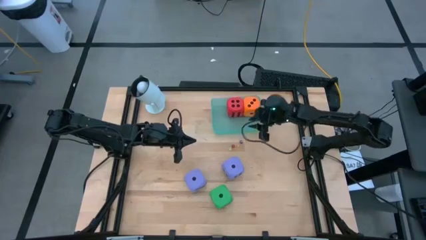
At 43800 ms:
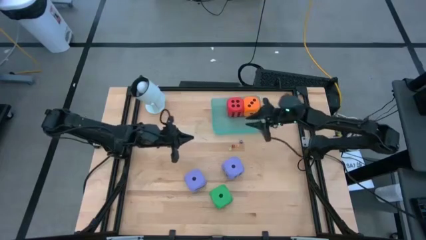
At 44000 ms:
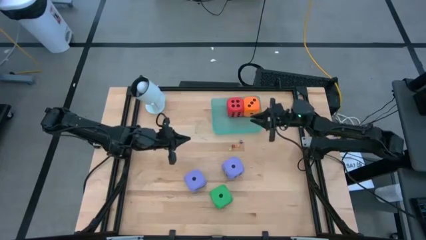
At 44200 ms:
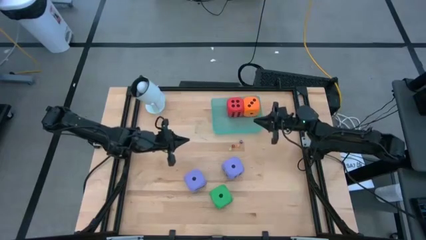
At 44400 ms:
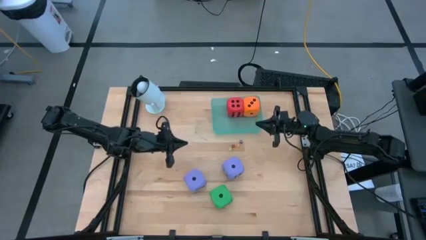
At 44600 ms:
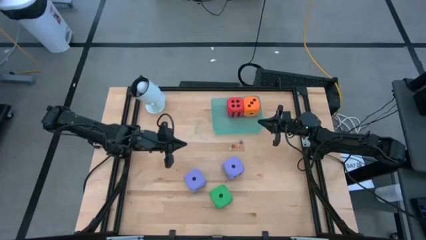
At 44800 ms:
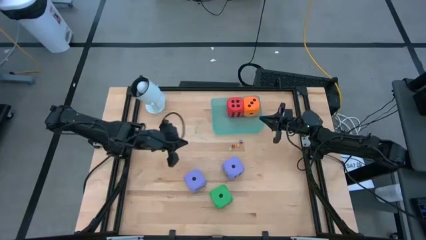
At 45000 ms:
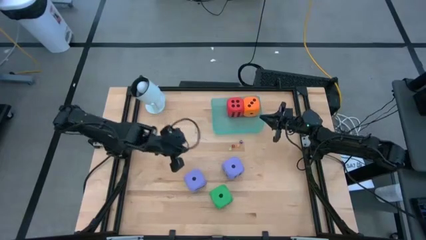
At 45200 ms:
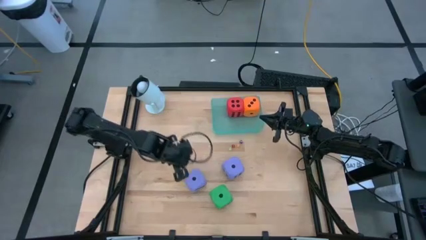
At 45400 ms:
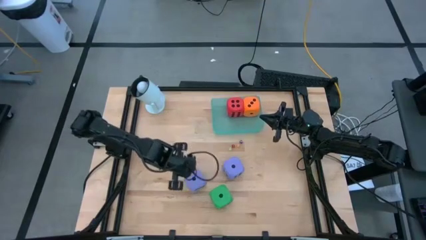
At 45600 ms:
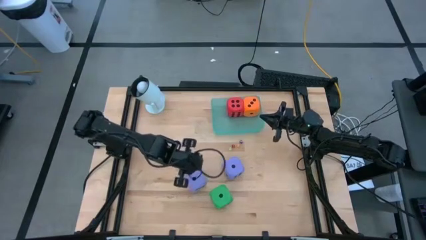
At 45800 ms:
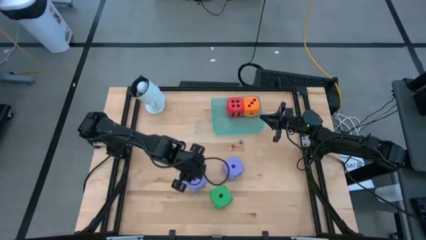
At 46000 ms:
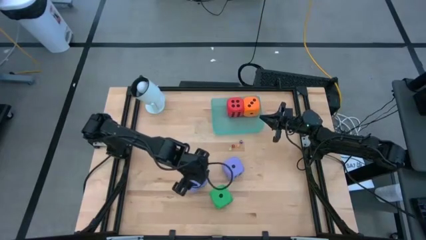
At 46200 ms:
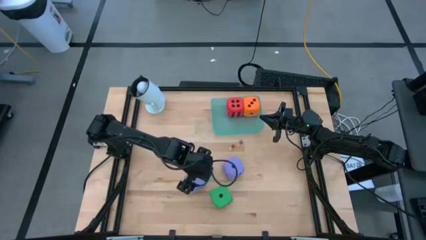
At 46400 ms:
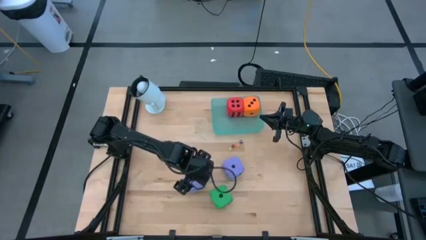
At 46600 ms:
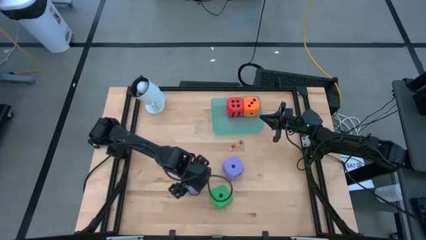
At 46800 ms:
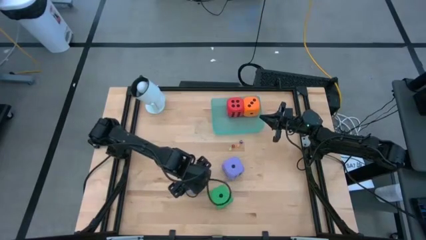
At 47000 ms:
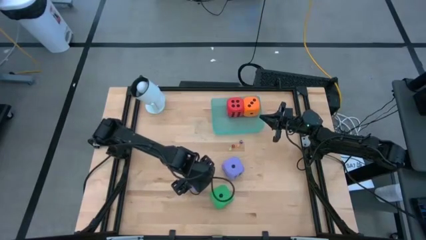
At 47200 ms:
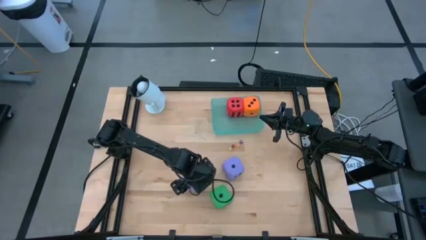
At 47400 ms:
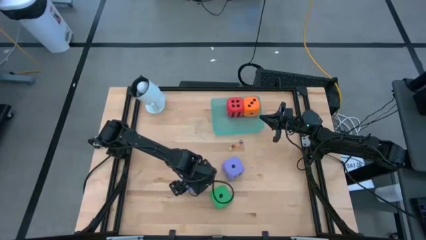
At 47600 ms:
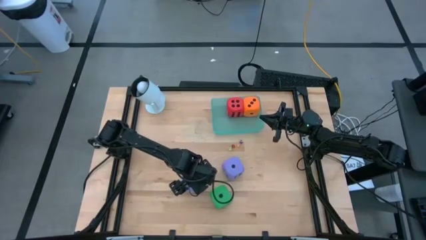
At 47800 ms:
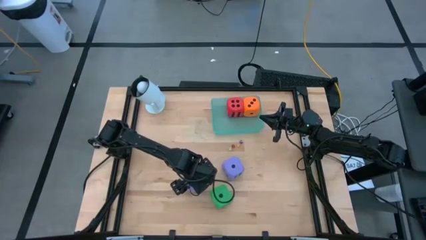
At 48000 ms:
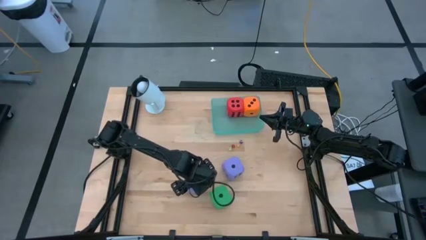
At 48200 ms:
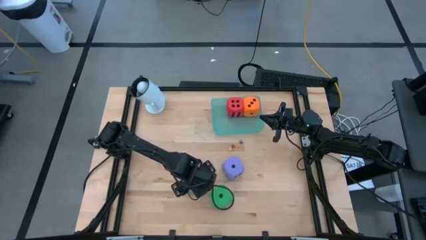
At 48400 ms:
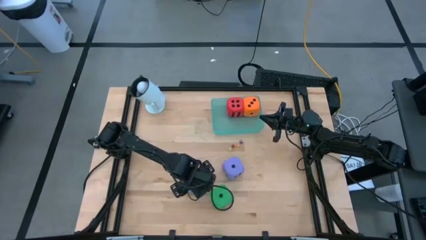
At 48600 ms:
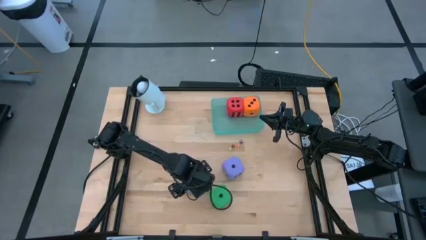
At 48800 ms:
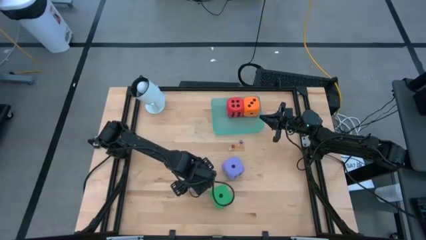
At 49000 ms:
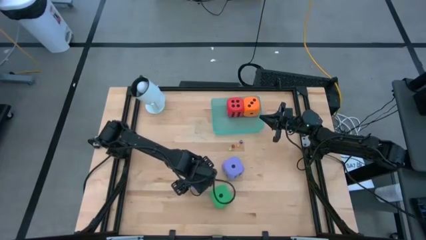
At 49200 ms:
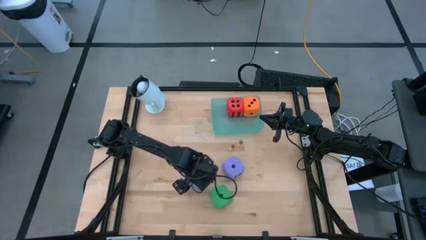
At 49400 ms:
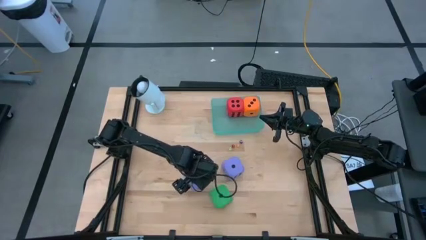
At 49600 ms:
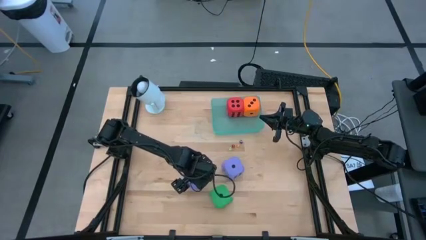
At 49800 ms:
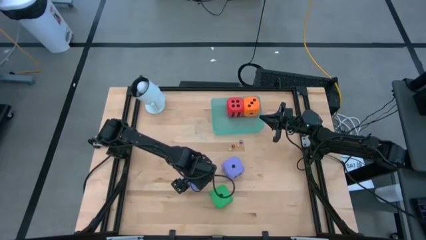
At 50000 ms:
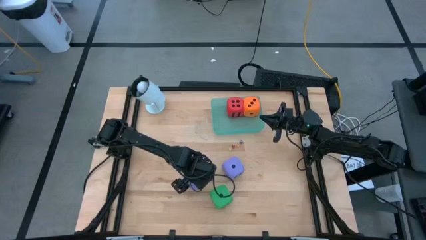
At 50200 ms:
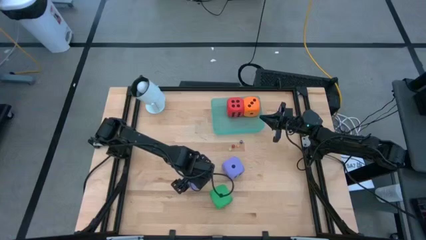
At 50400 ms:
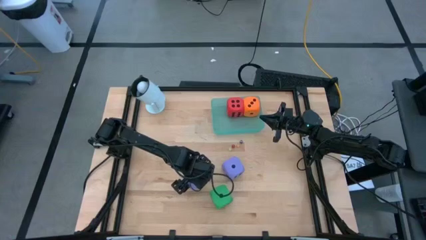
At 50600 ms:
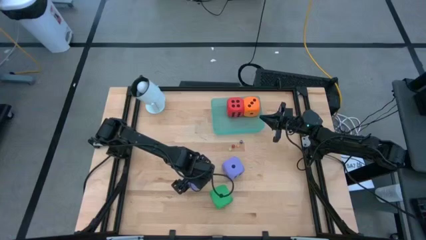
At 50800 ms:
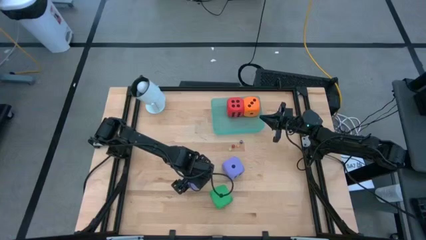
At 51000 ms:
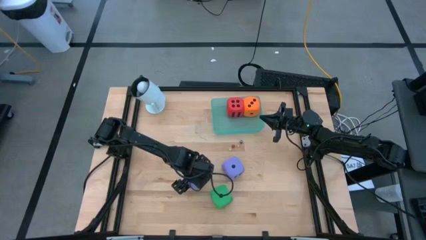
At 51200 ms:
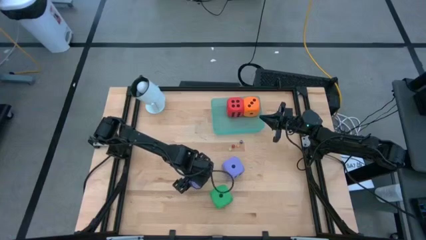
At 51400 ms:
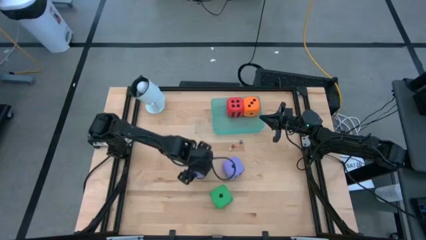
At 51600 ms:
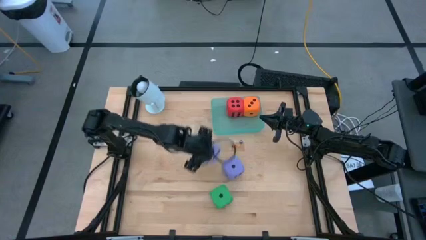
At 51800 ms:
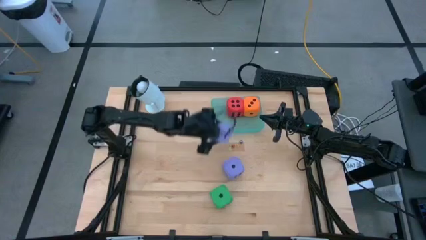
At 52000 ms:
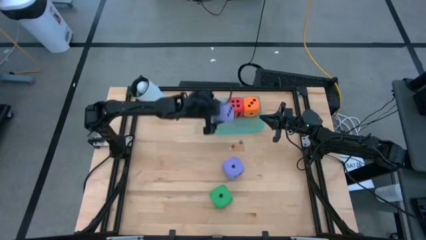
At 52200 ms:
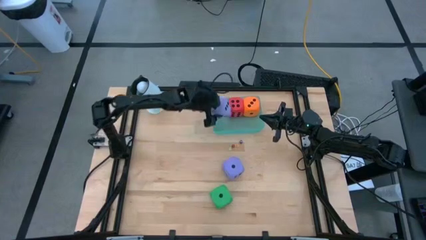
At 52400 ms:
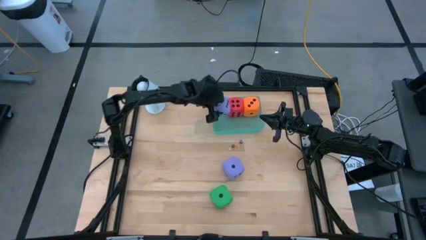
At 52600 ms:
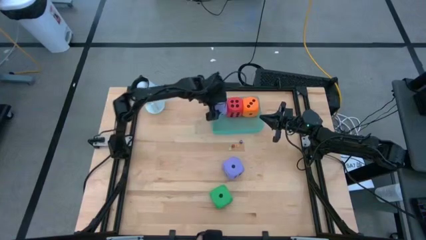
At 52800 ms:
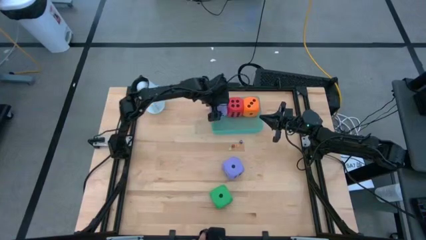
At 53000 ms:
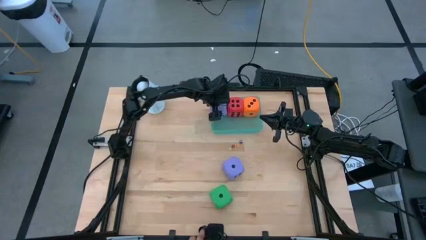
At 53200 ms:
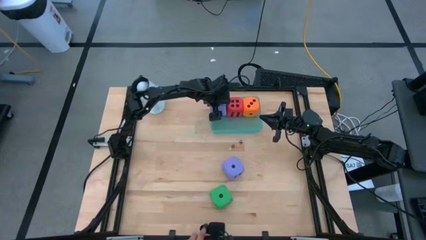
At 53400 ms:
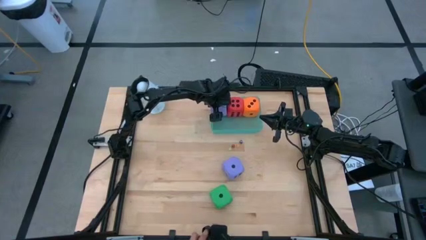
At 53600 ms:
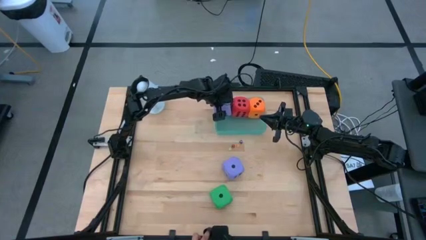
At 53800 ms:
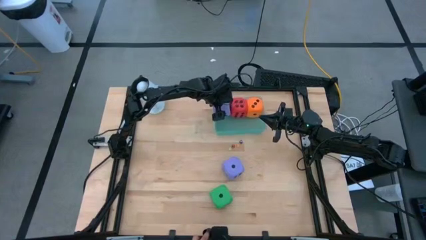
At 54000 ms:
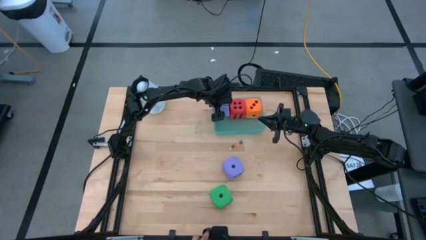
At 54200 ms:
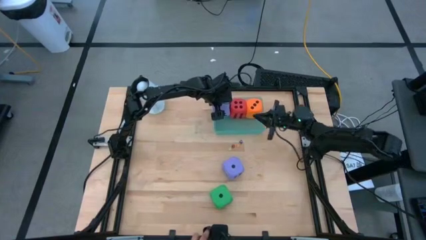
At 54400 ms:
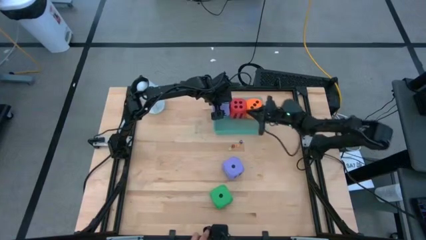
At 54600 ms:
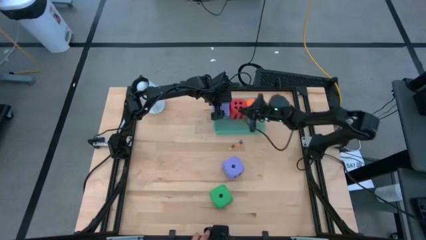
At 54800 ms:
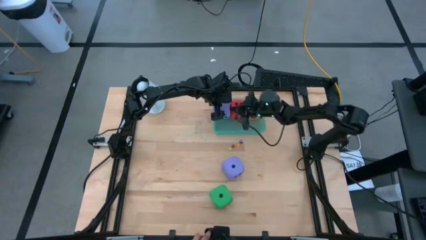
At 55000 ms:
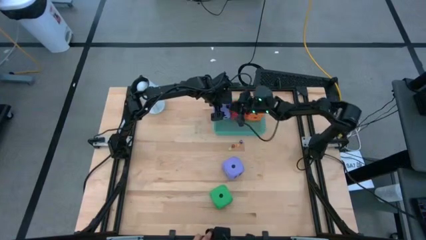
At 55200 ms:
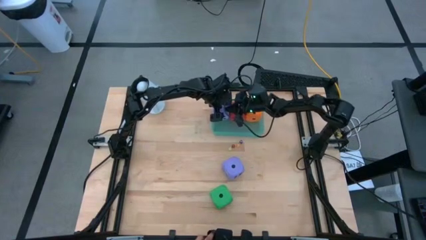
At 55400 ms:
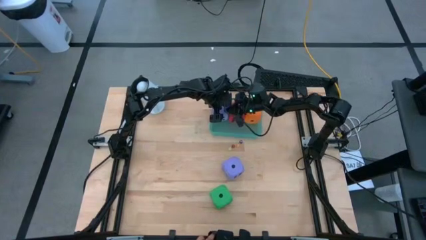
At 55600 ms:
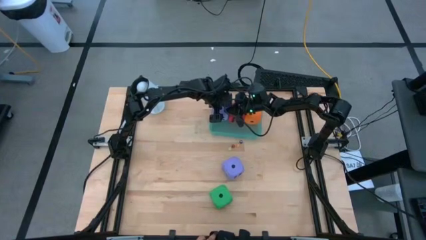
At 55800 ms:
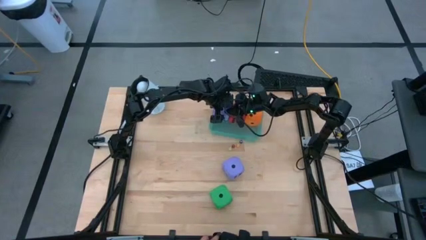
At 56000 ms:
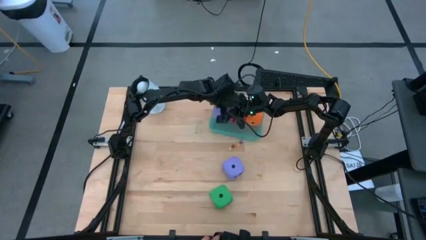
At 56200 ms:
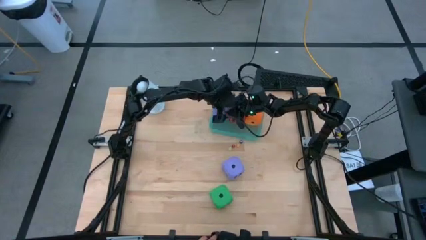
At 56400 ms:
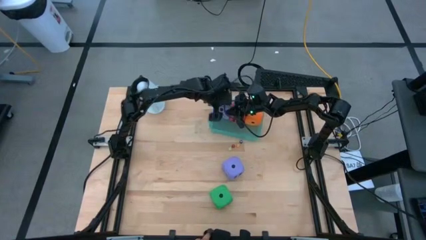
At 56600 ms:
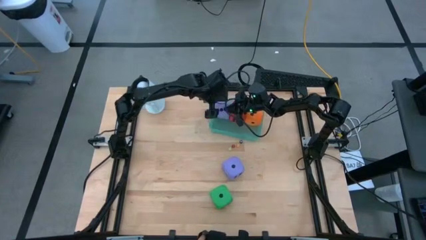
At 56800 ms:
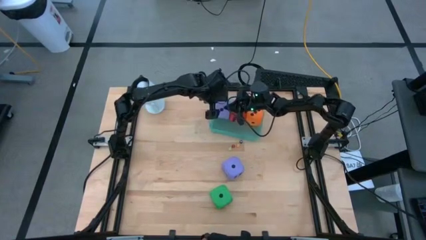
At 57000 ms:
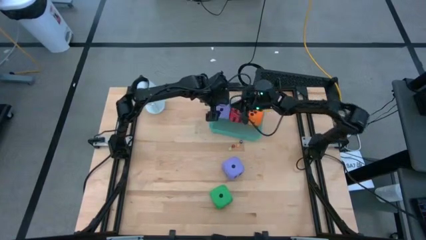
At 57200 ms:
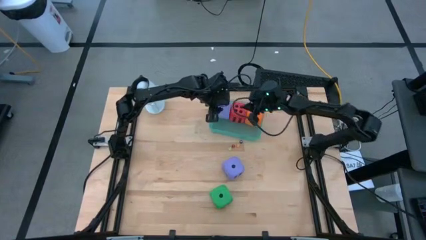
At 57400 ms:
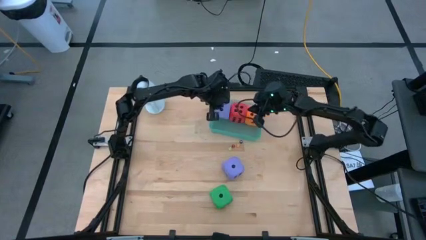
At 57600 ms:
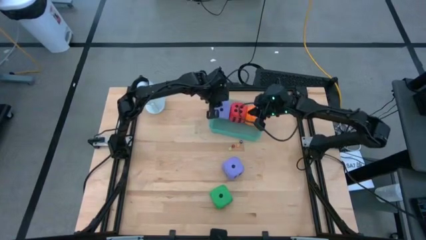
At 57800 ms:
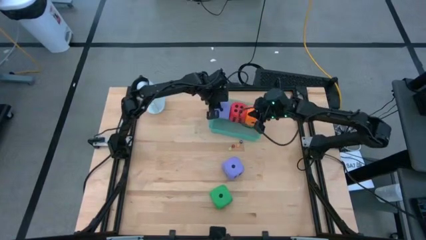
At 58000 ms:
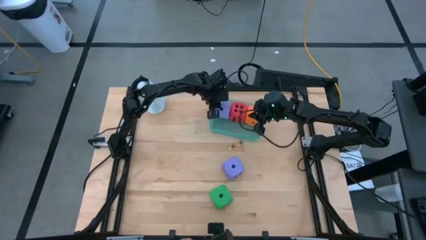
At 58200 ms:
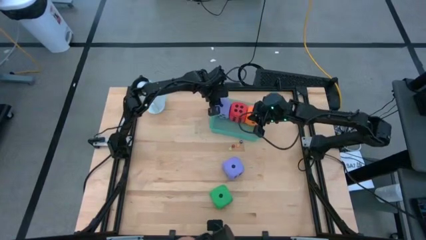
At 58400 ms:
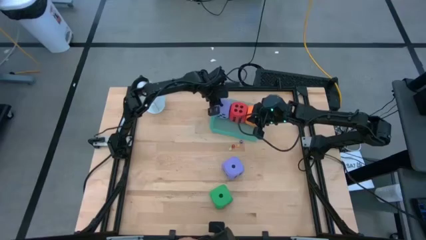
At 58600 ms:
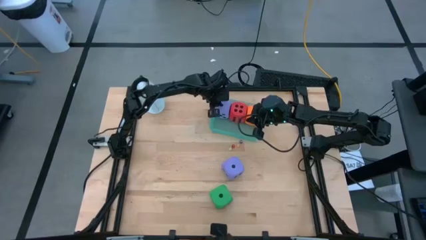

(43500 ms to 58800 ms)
Task: Pick & Place Dice
Put the left big violet dice into the transparent blue bin
